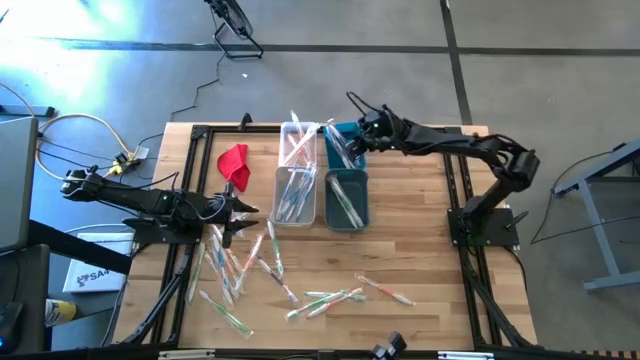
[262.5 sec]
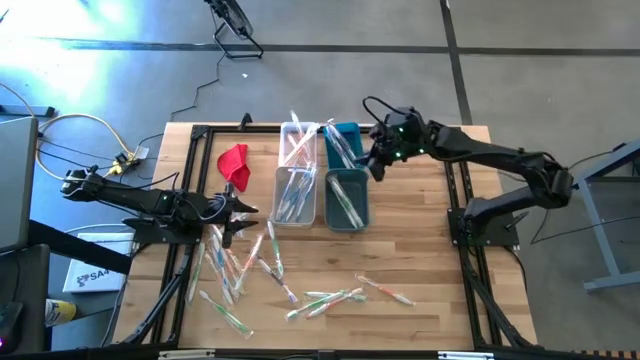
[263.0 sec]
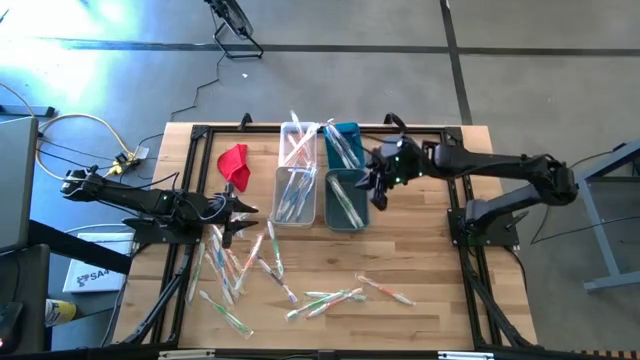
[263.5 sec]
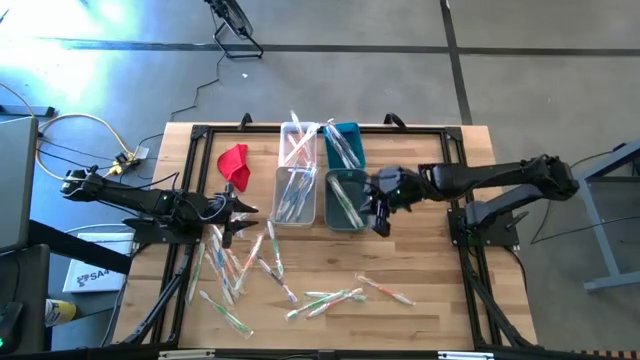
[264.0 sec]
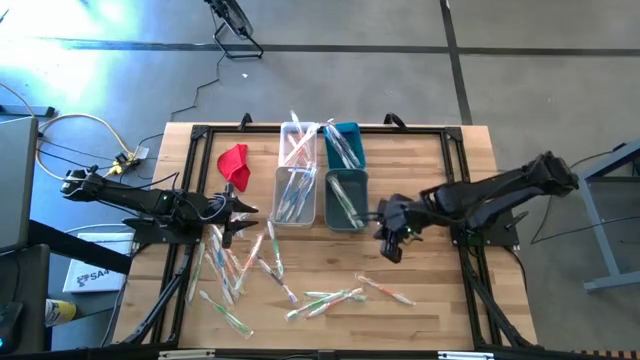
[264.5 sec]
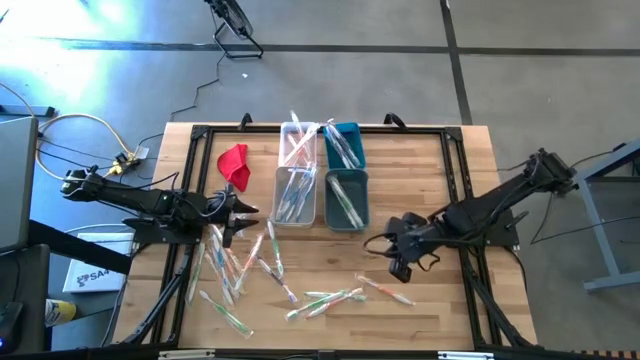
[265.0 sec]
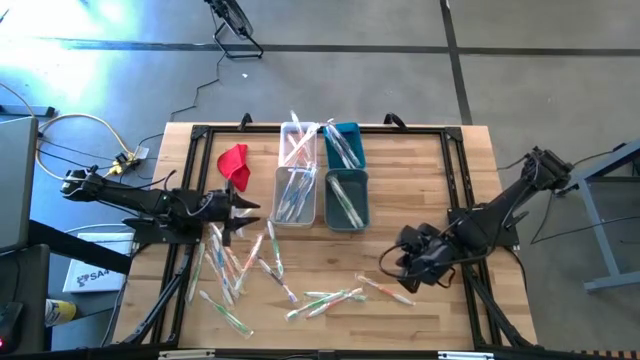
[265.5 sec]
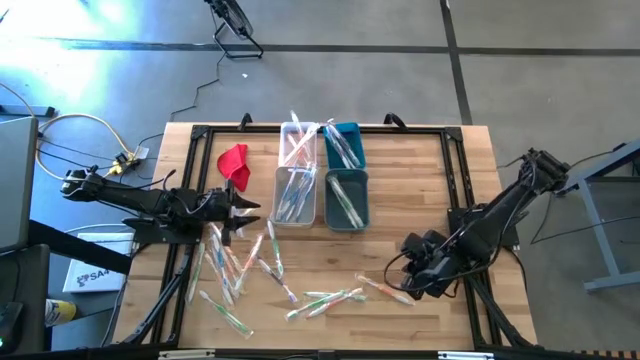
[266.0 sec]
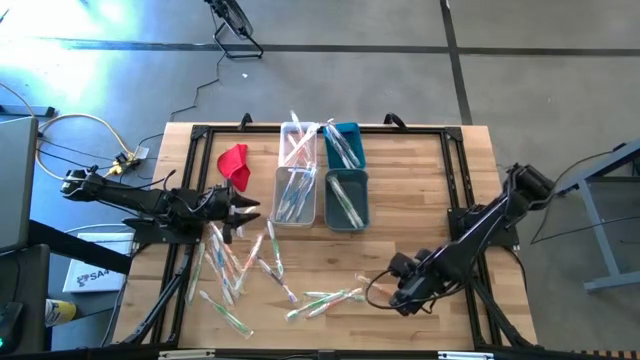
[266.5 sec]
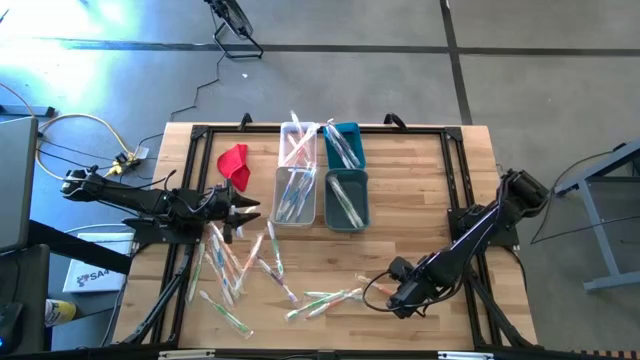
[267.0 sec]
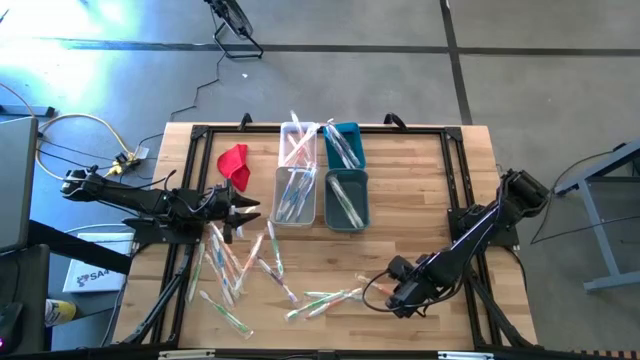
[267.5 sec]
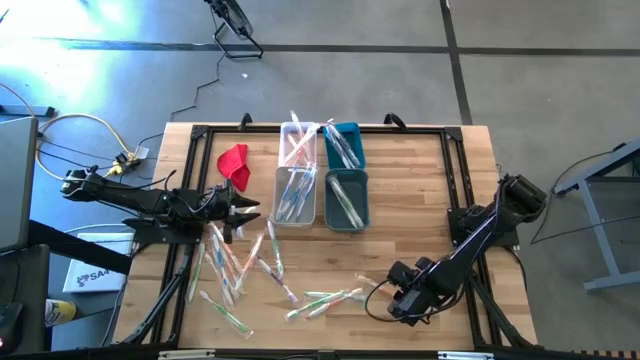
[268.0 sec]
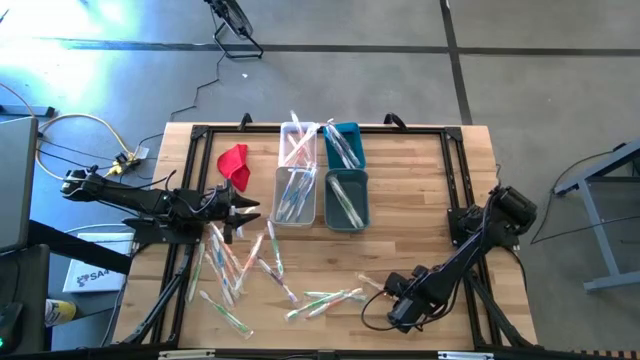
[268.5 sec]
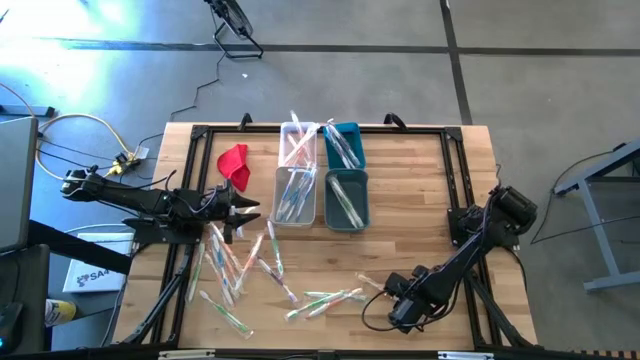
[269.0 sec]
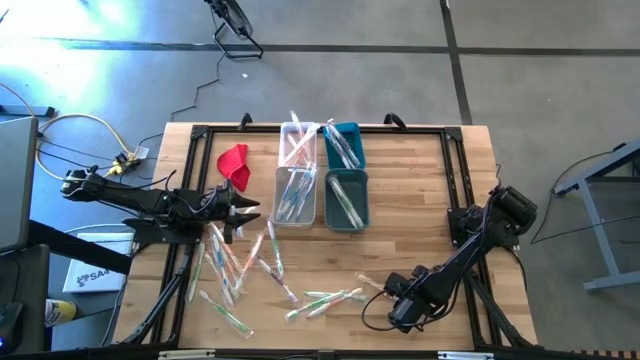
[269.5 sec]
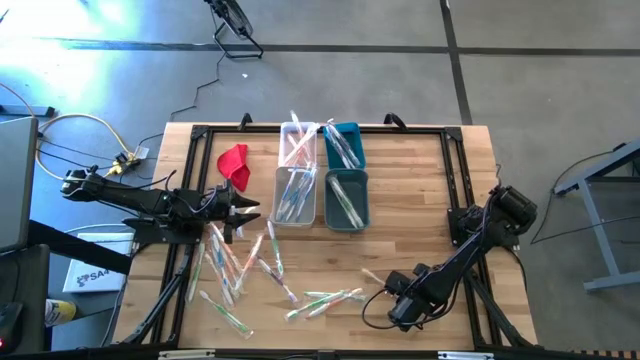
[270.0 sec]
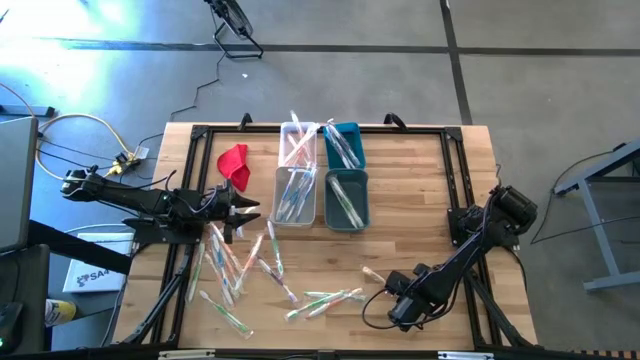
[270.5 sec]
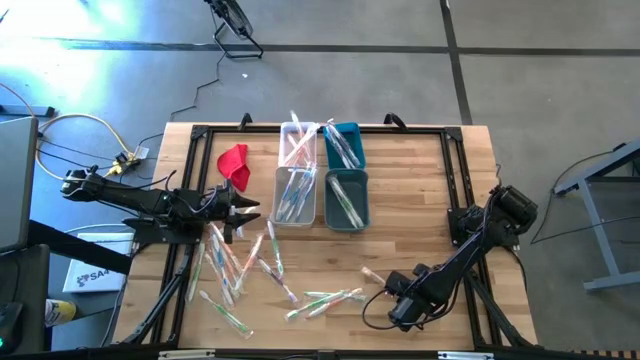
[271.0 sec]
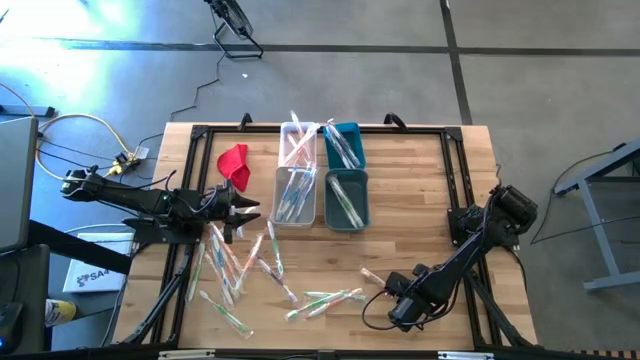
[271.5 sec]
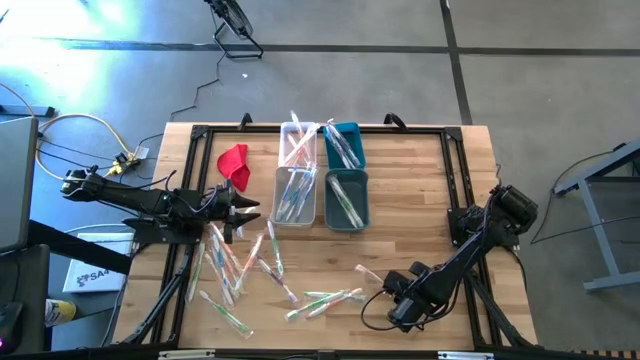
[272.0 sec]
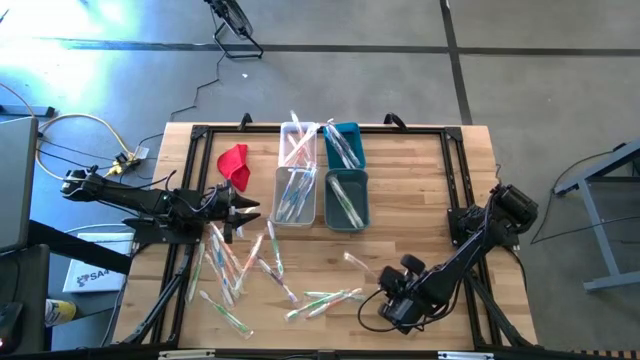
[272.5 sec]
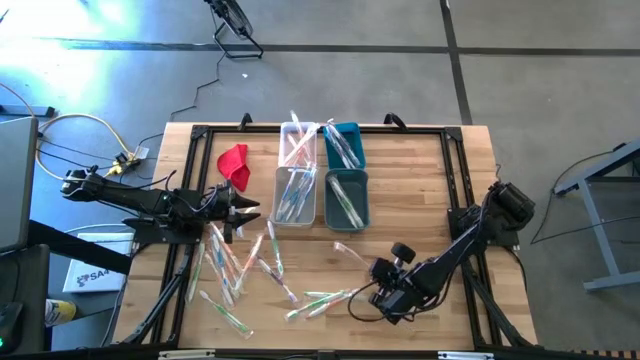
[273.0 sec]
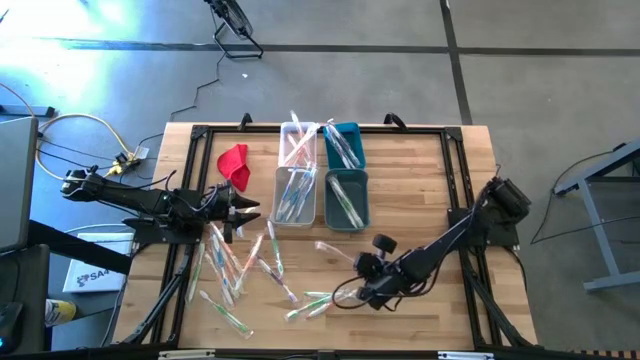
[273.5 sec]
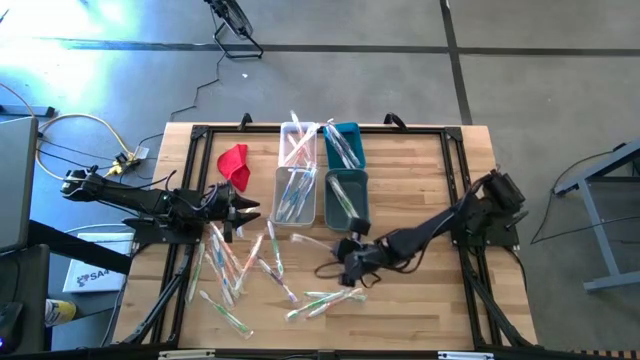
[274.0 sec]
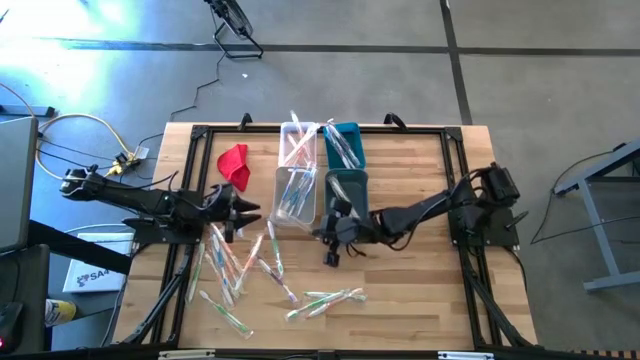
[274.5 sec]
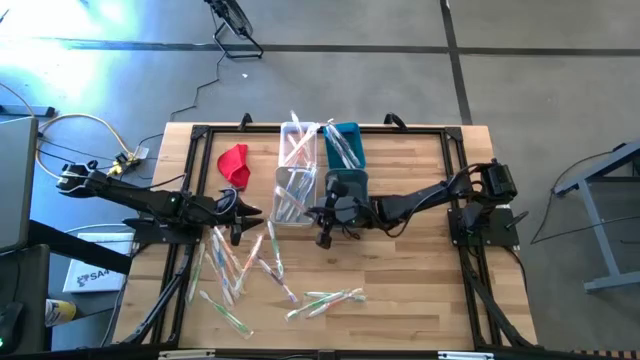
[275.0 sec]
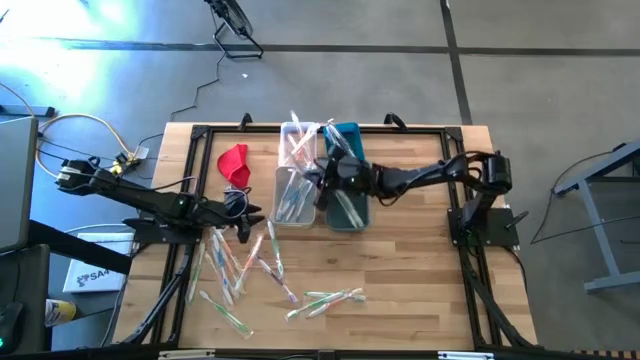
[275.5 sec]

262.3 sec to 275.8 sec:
Task: Pick & Place Toothbrushes
Put the orange toothbrush into the transparent bin
